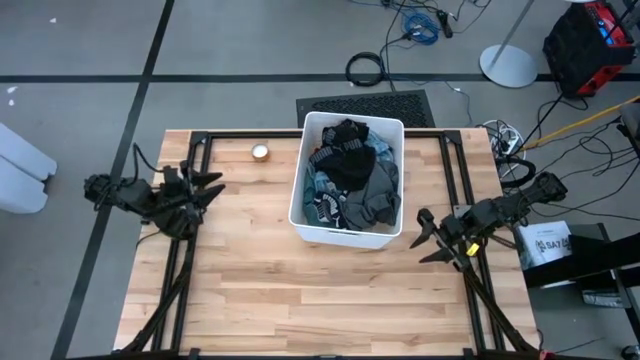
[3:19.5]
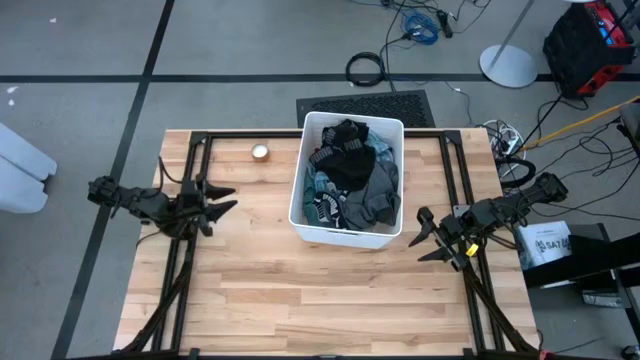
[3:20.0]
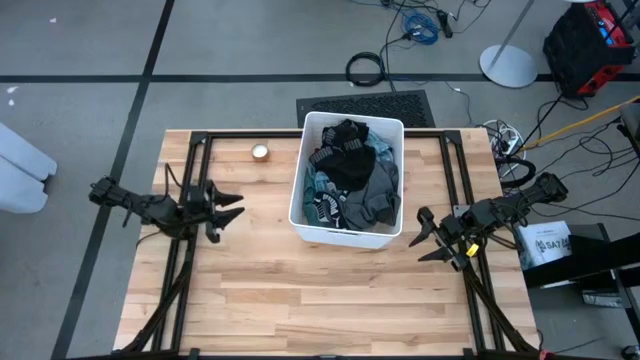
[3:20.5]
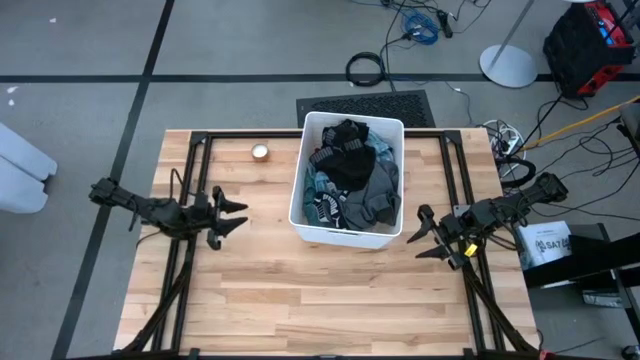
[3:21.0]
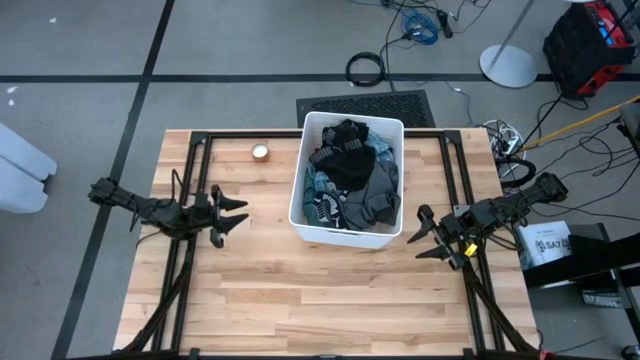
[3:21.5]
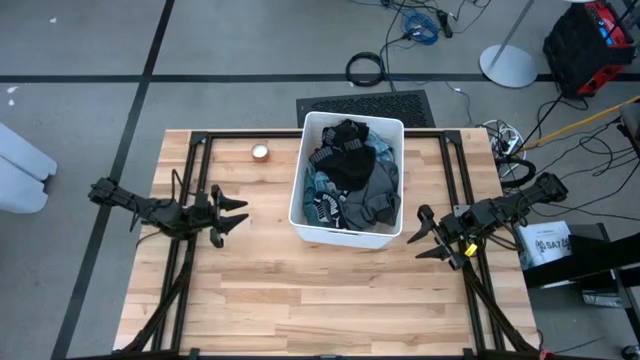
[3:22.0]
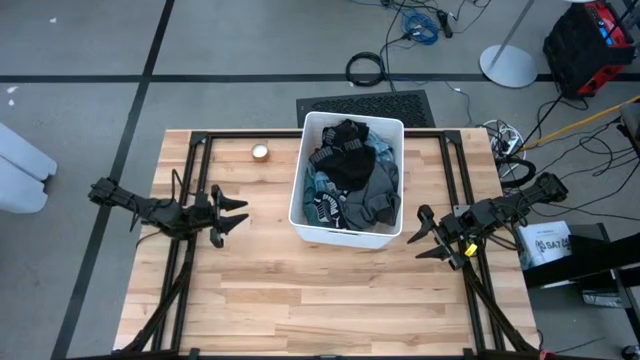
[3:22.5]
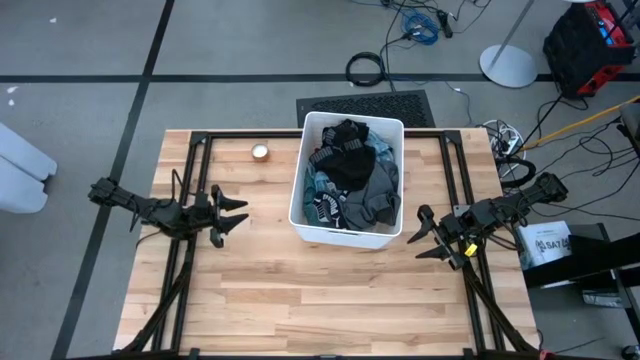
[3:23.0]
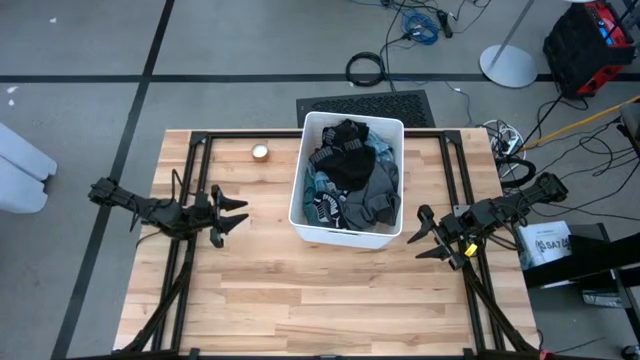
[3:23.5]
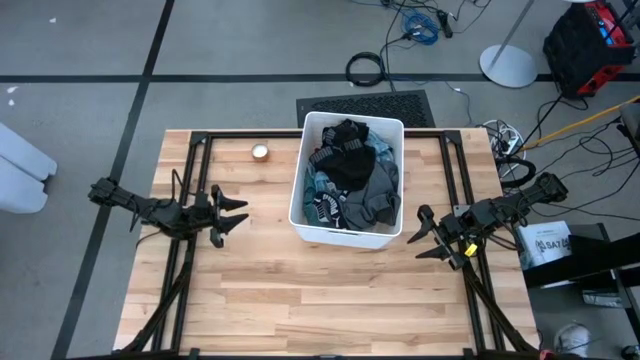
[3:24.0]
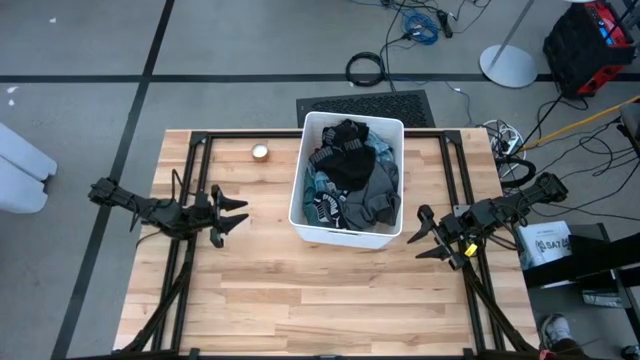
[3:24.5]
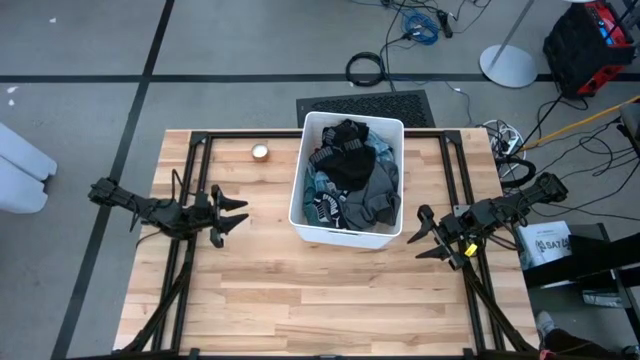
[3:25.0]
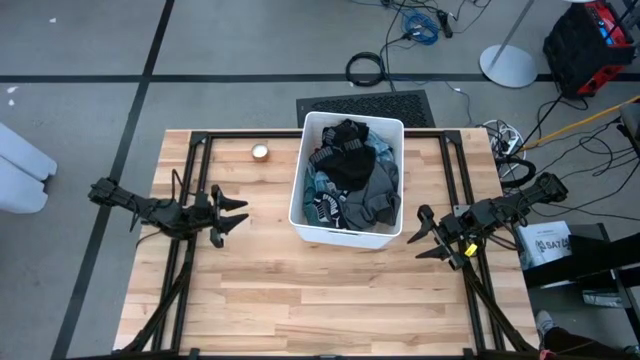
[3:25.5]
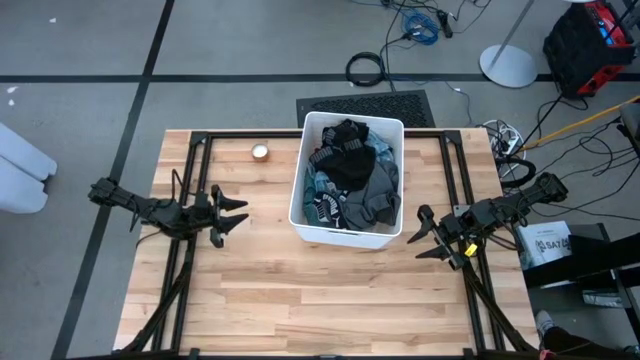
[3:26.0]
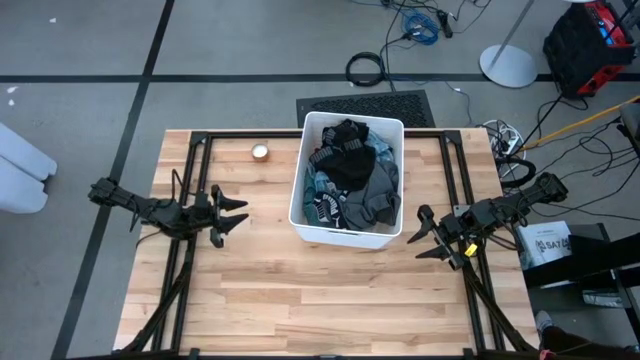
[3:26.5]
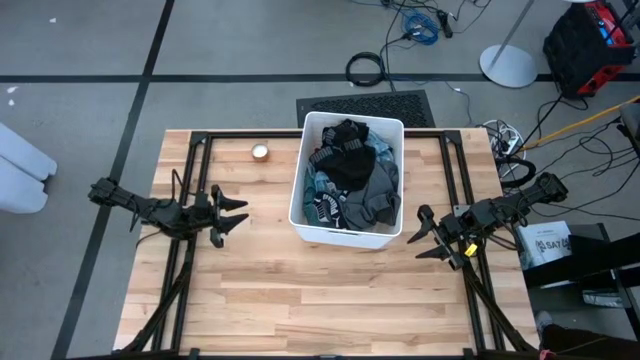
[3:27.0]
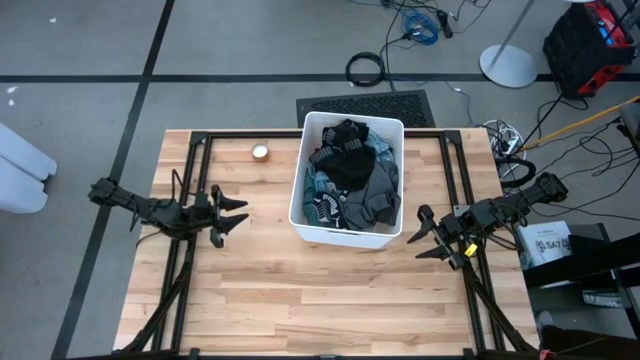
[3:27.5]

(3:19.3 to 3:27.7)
Task: Sort clothes
Return to Home Position

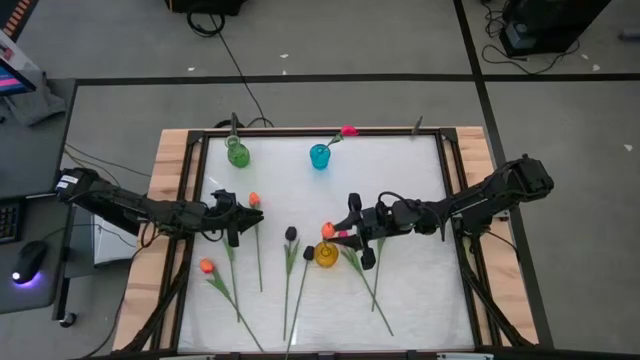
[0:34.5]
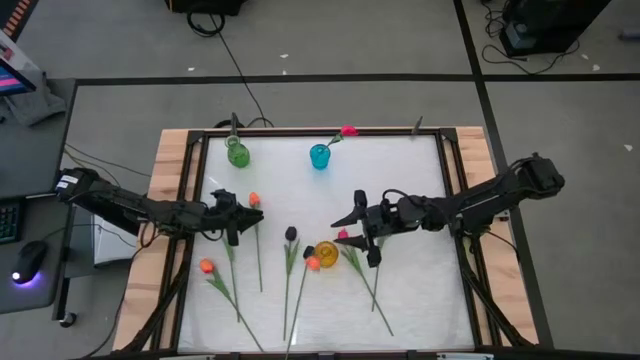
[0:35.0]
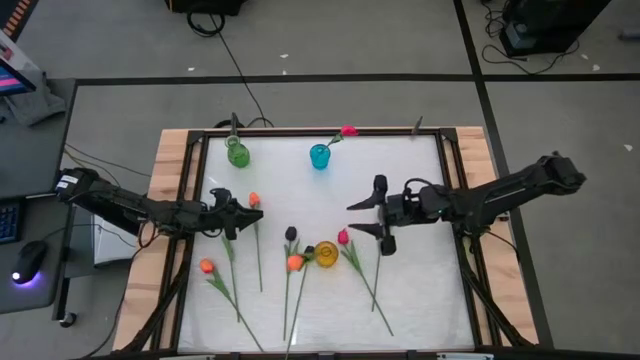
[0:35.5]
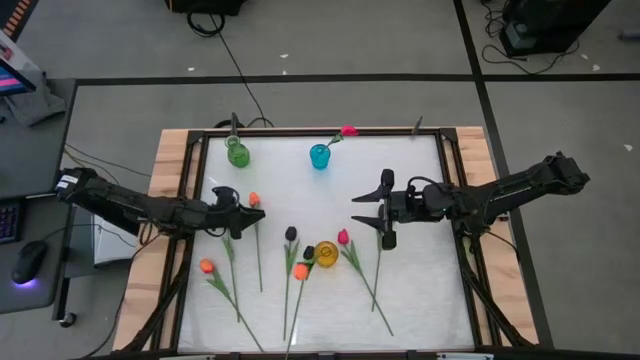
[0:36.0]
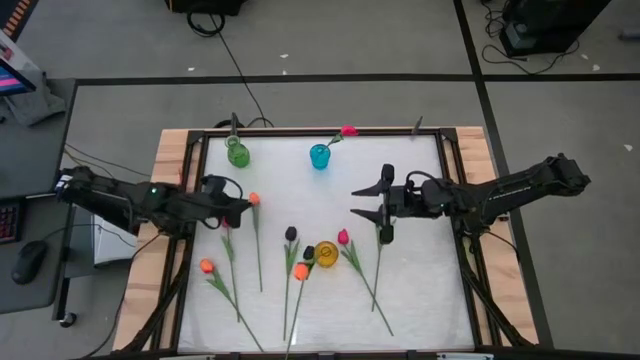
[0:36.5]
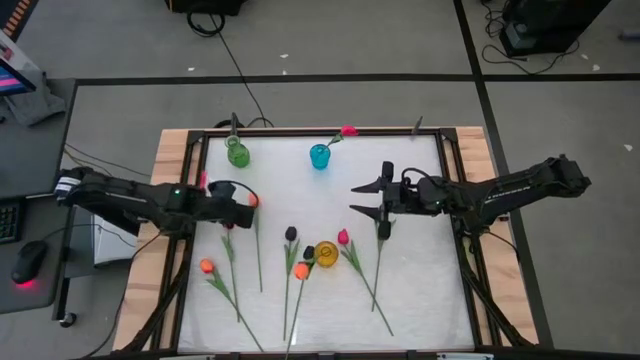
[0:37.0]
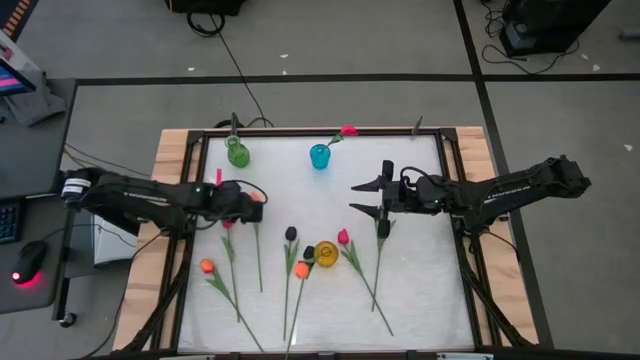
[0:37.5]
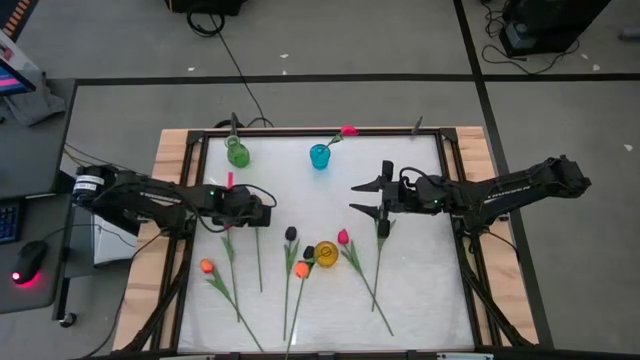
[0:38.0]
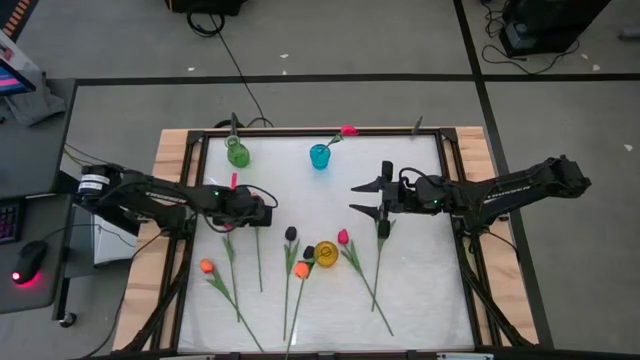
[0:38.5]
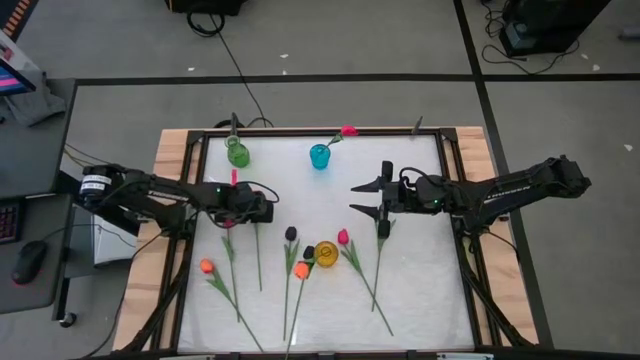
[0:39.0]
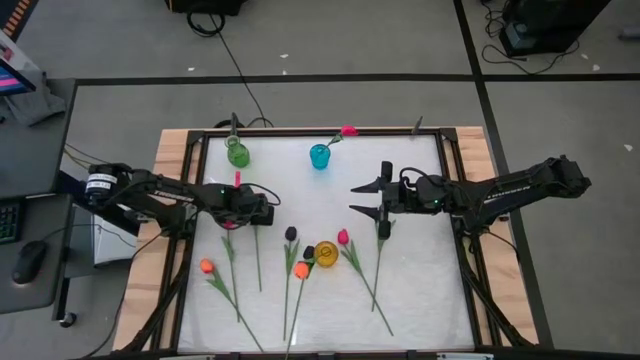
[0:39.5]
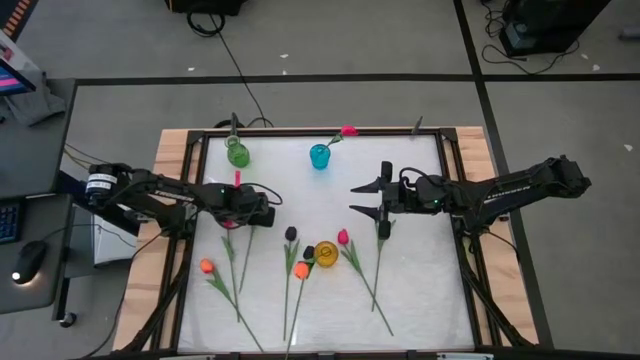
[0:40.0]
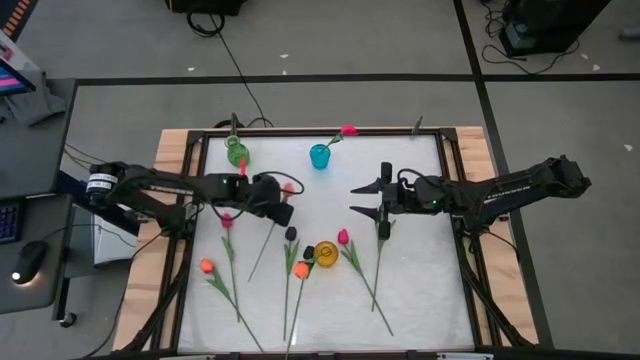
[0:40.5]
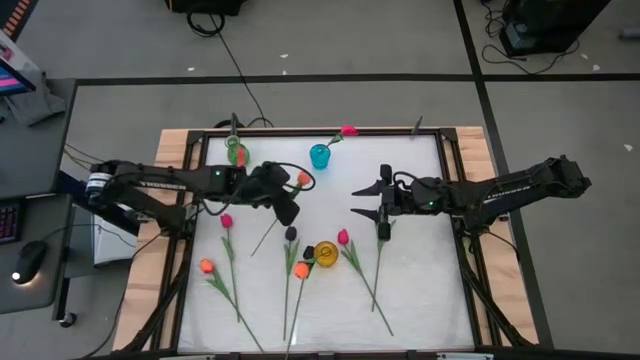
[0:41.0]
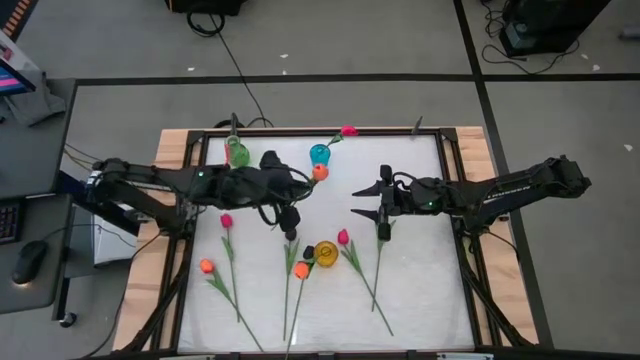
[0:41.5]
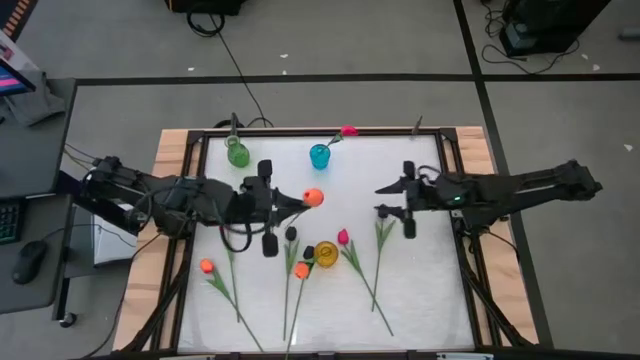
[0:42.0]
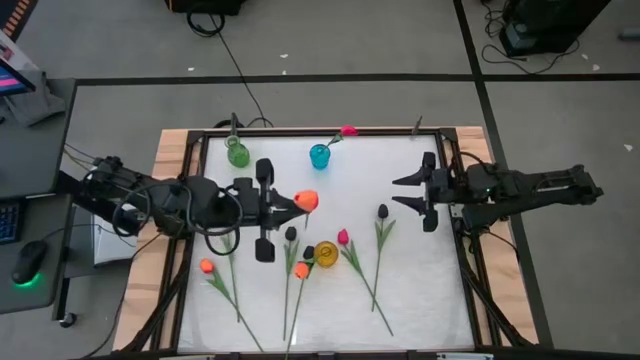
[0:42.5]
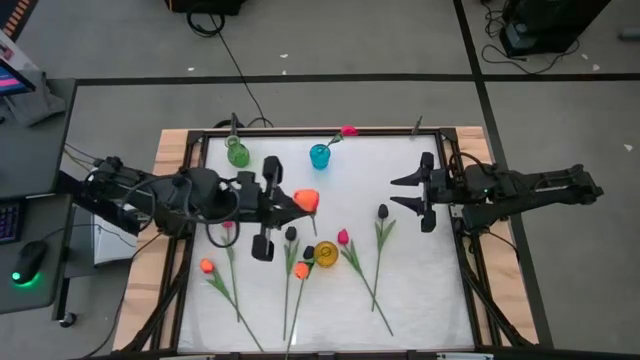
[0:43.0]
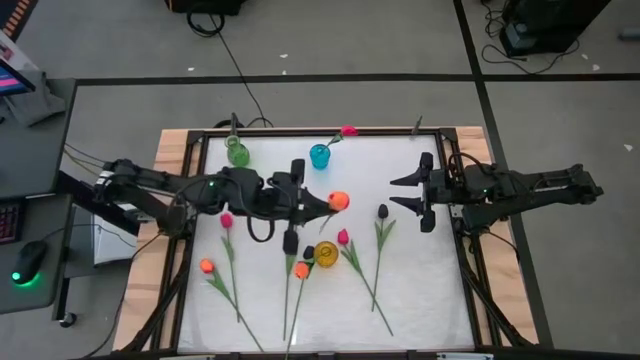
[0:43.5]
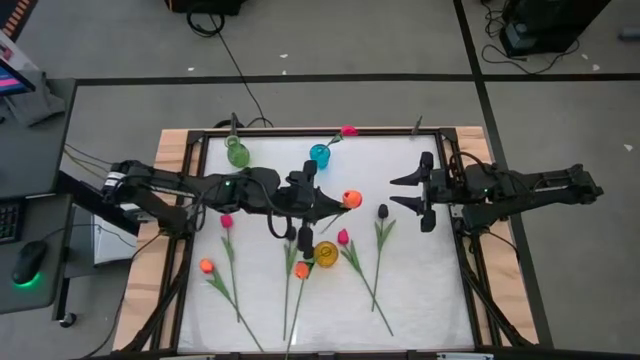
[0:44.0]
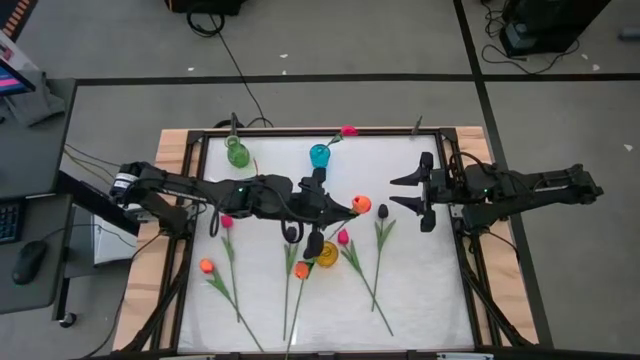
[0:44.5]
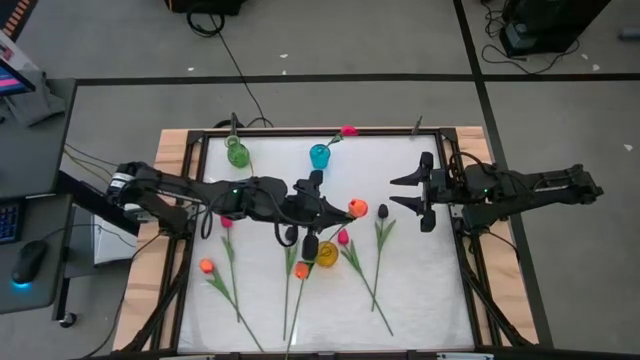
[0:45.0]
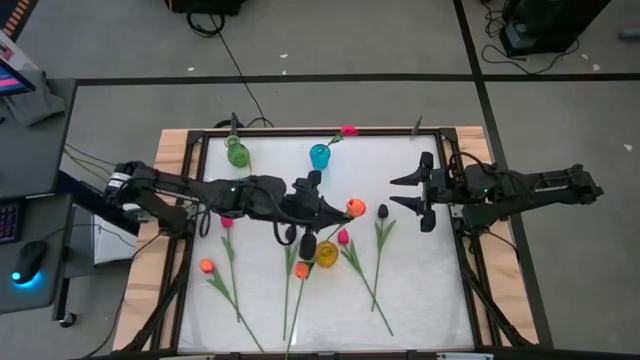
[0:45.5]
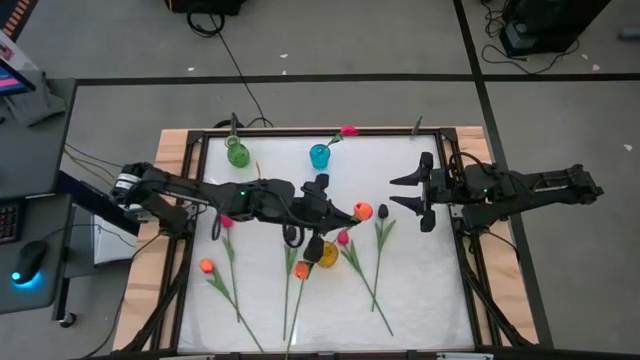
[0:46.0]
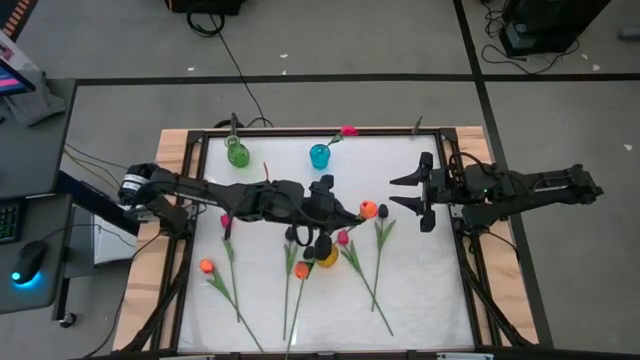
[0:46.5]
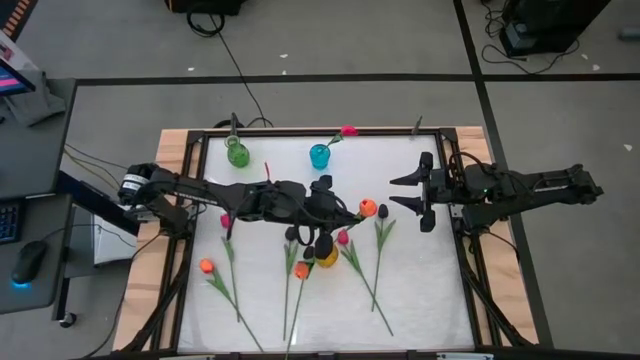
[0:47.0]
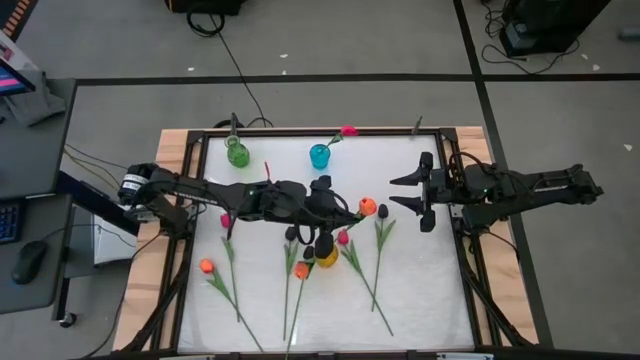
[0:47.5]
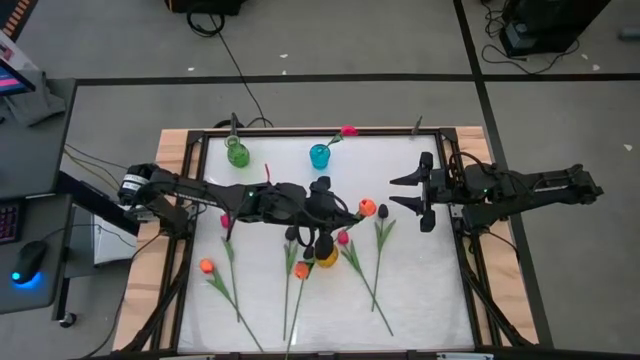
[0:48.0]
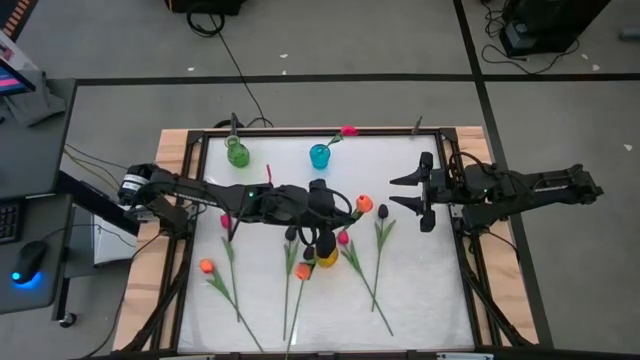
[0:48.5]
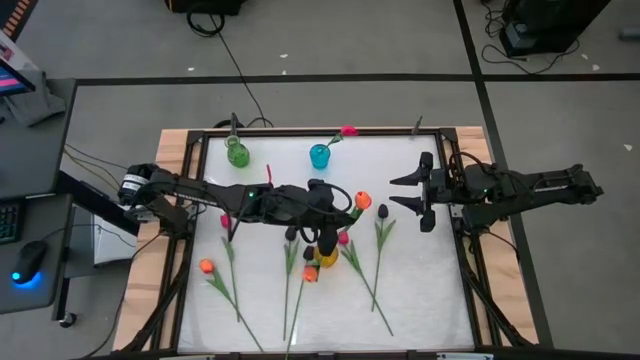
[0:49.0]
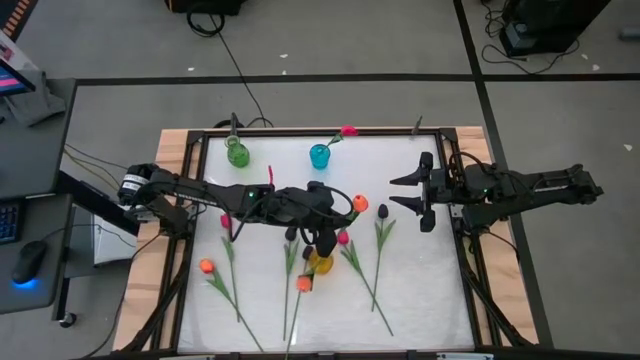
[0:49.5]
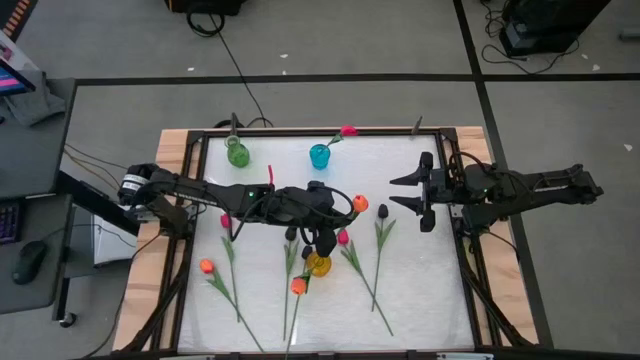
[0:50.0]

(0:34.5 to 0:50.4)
Task: Sort flowers into vase by color
Put the left orange flower into the yellow vase
